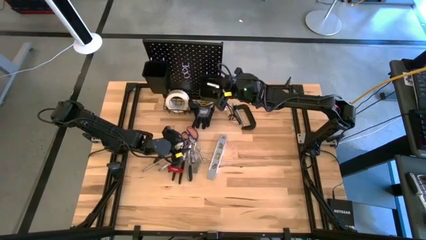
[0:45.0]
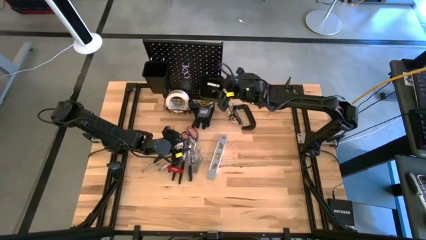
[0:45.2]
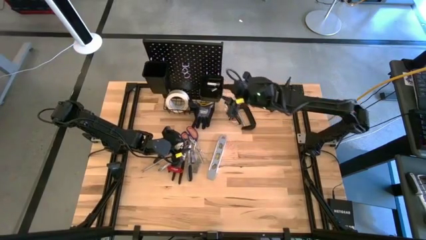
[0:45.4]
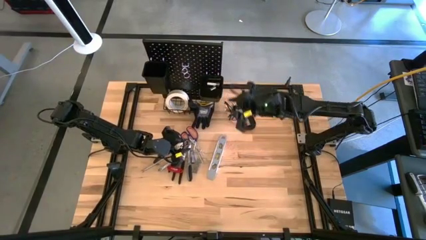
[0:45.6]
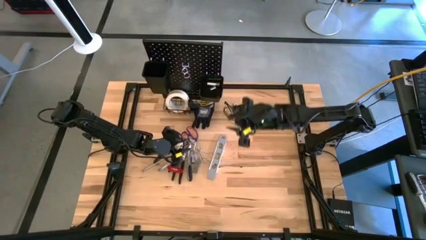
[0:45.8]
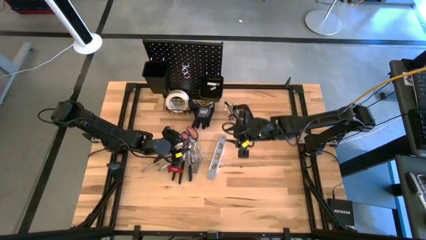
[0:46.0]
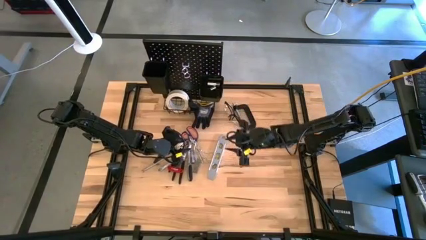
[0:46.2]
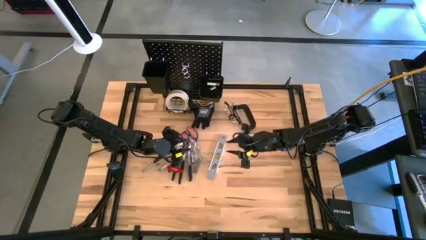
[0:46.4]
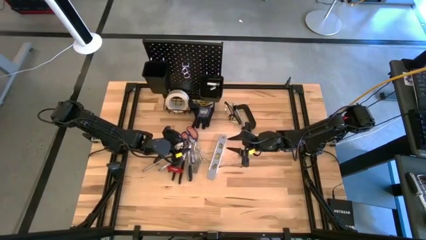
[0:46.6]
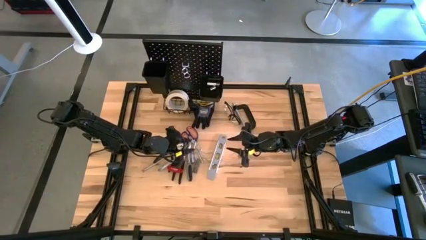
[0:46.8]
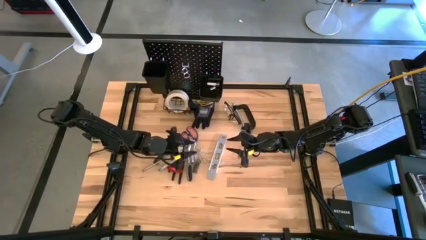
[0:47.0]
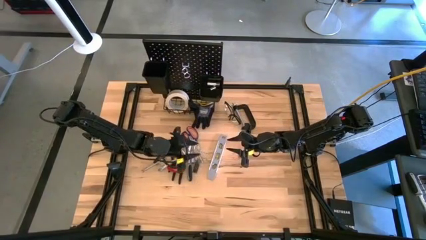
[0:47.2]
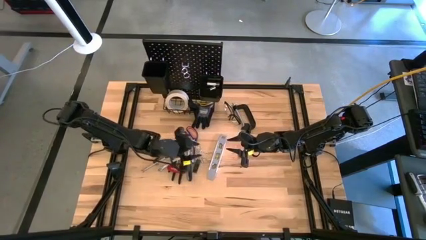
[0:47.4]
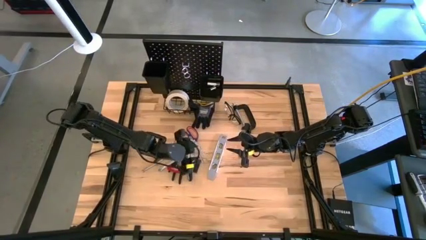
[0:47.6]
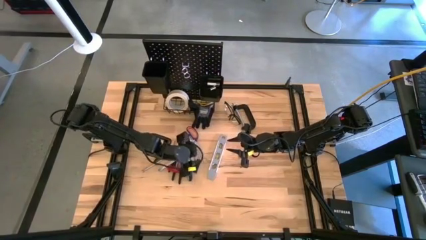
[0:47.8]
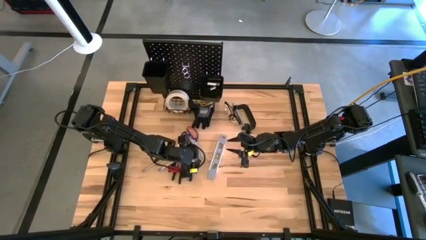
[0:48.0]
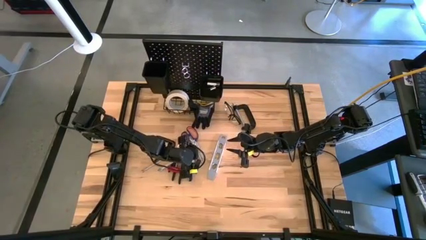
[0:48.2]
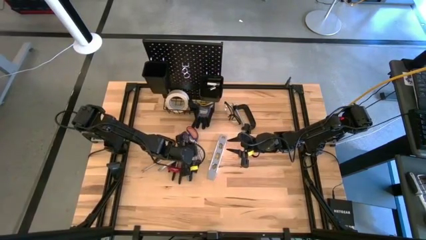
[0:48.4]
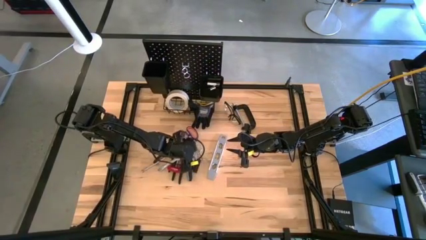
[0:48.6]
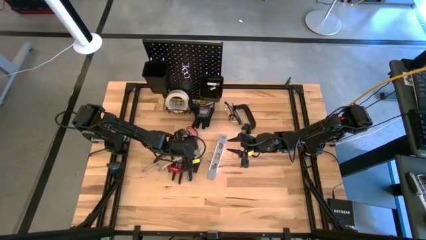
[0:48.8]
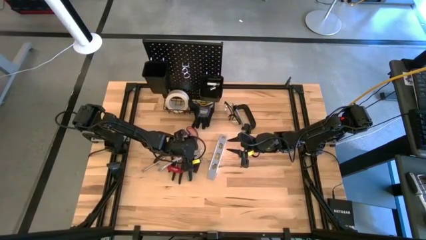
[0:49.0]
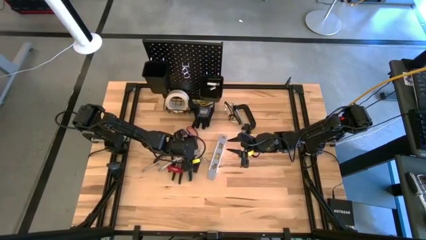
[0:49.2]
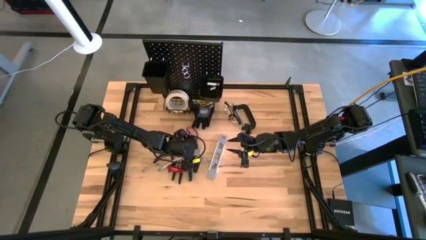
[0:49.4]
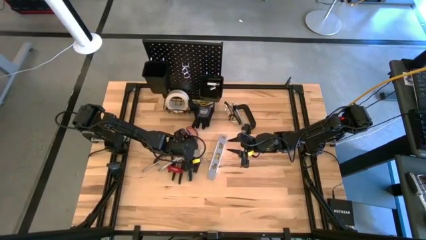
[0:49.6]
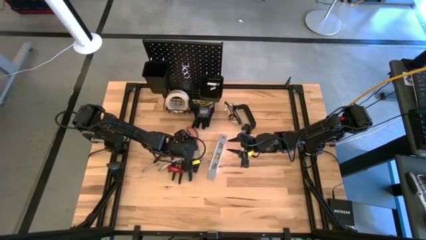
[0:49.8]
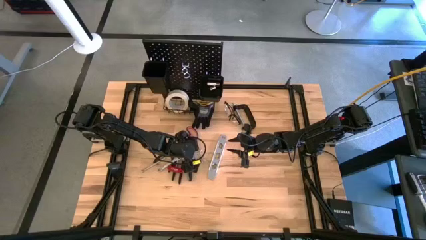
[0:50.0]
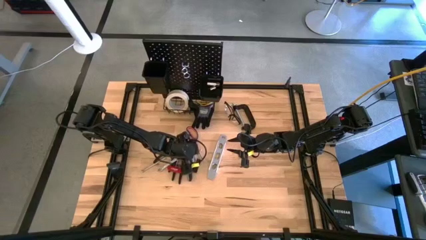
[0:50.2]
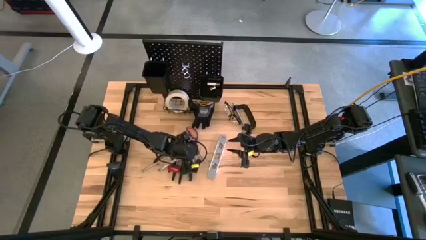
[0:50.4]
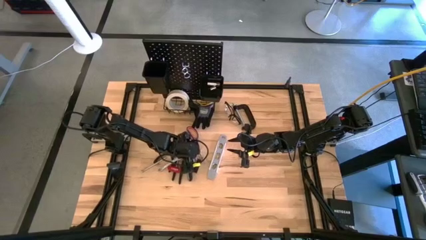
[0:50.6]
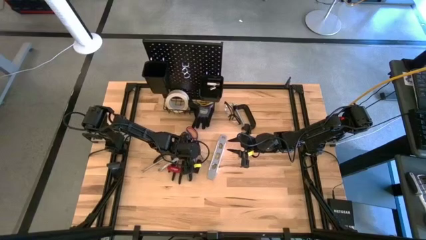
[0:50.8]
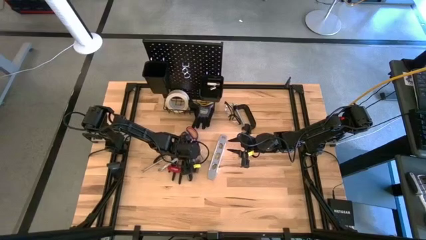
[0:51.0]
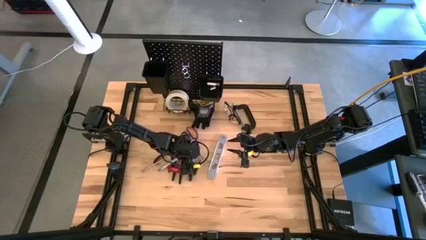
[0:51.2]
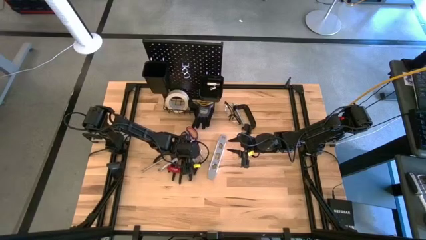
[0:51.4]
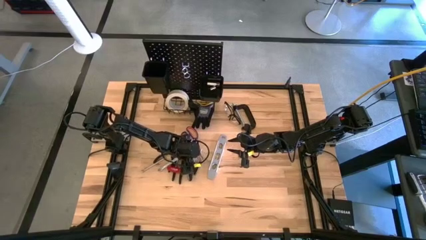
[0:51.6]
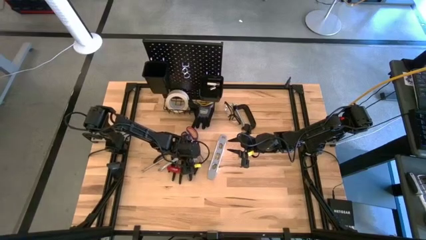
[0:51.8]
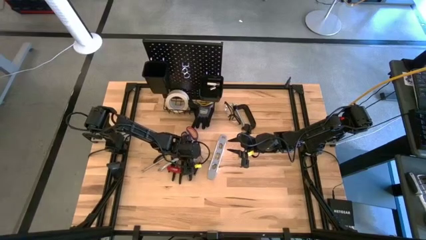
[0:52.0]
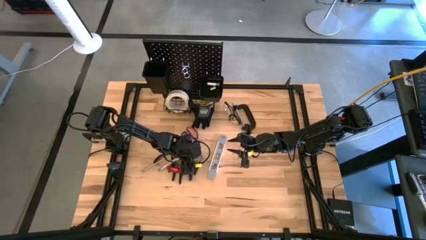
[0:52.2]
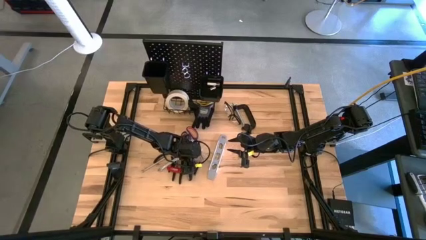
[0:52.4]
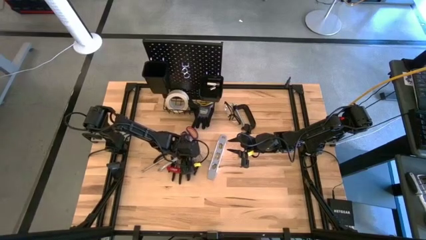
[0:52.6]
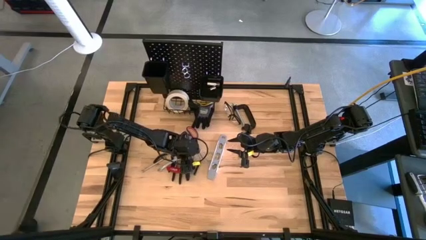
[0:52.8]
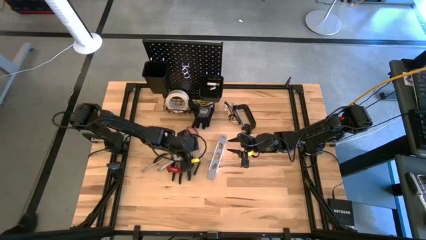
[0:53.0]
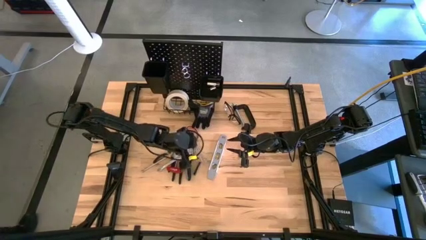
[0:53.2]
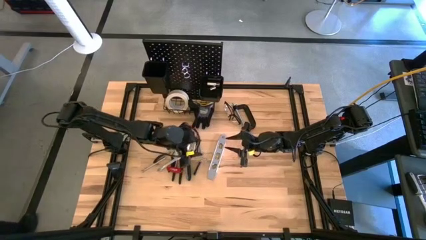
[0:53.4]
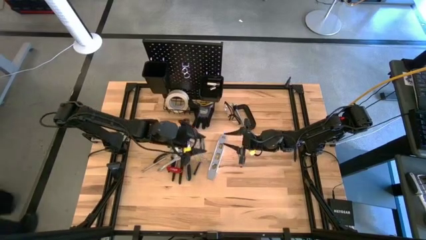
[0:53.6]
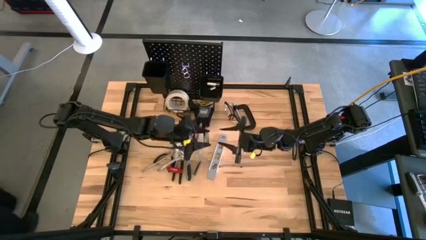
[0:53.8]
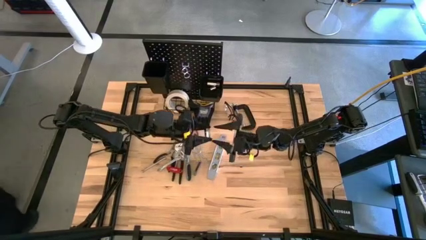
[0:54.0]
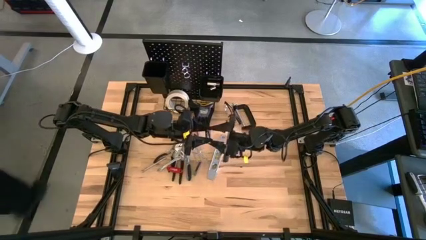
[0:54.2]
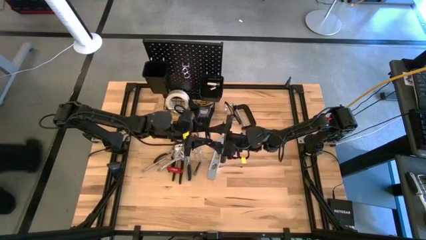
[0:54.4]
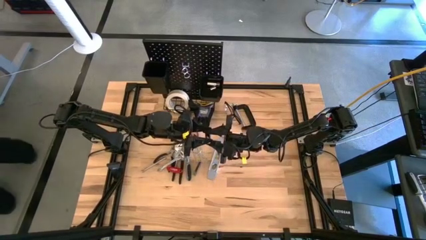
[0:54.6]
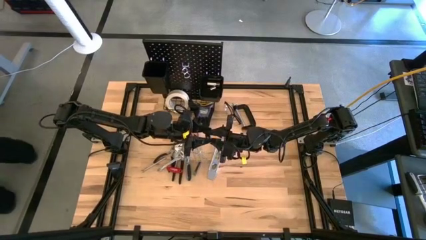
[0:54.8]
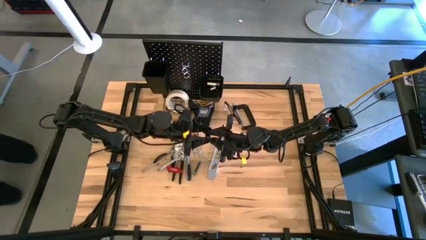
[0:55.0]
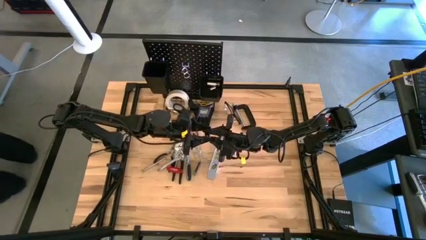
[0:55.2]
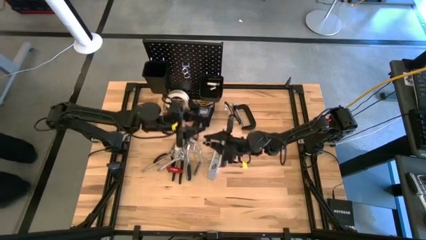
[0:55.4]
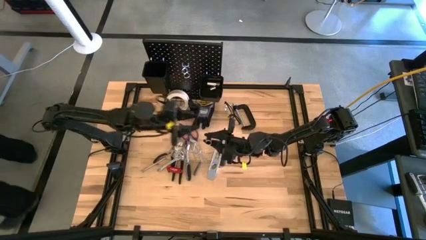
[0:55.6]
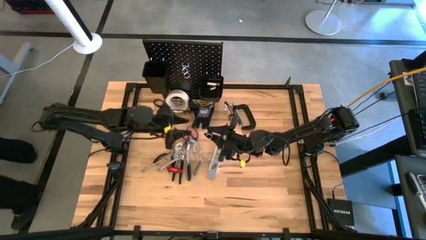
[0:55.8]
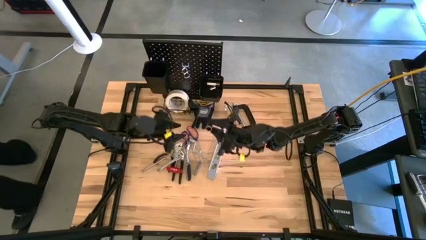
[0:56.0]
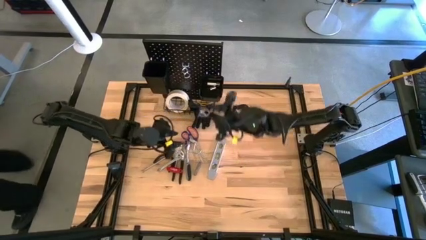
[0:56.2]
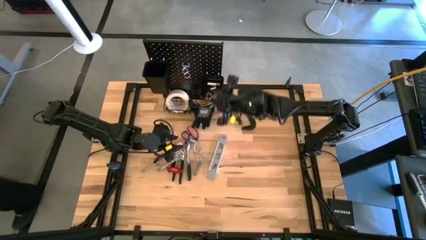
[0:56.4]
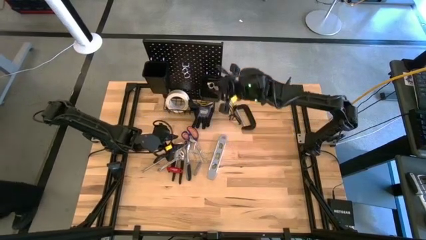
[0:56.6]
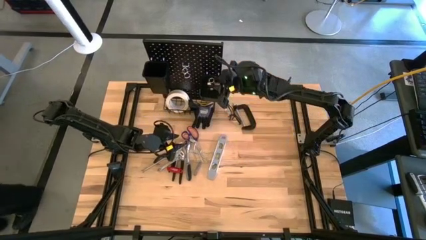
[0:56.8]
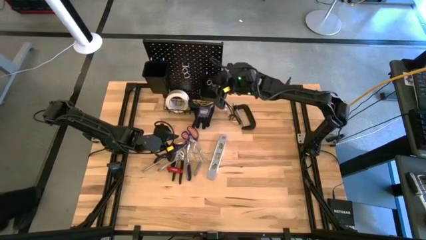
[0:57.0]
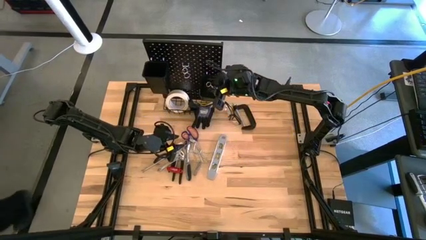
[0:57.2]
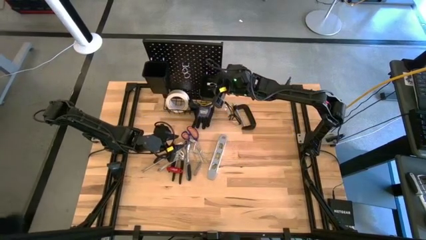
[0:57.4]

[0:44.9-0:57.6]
Task: Hang tools onto peg board
Put the extension bar into the right black bin on the pegboard

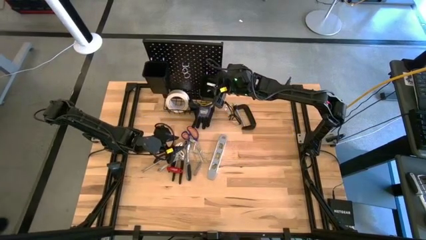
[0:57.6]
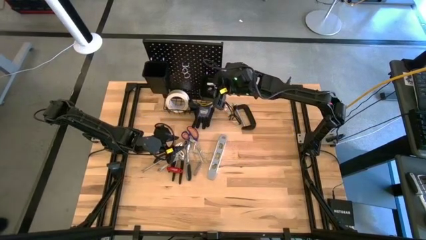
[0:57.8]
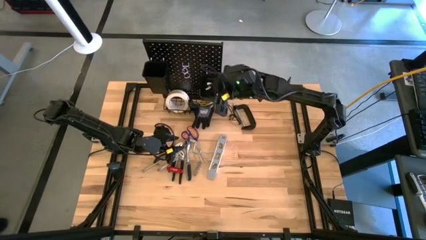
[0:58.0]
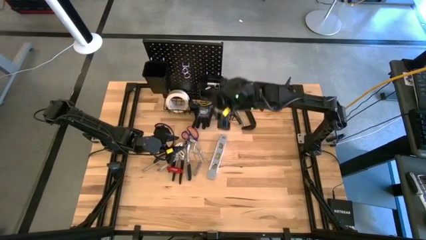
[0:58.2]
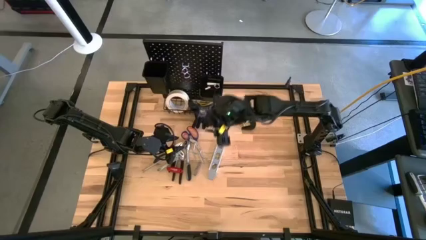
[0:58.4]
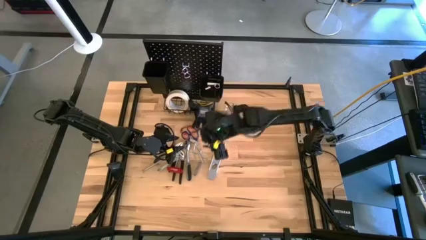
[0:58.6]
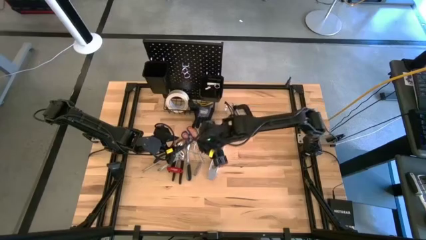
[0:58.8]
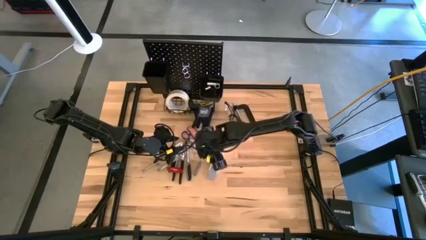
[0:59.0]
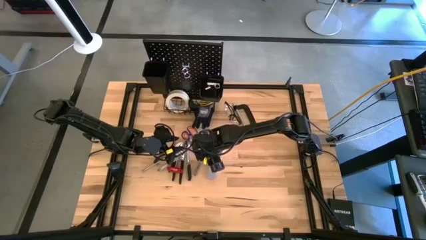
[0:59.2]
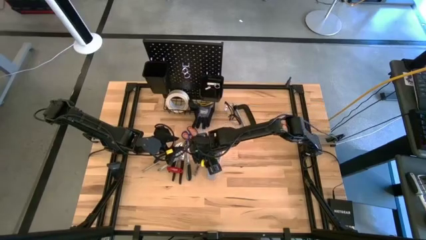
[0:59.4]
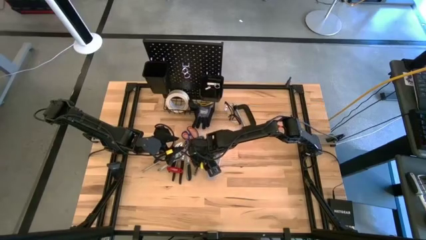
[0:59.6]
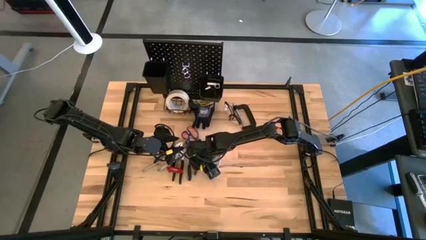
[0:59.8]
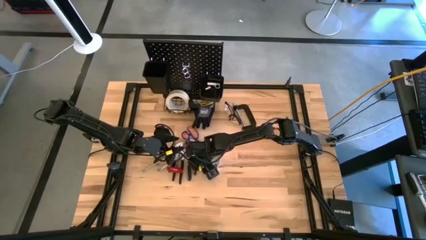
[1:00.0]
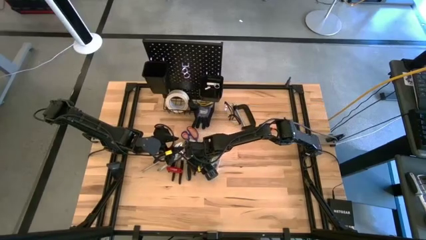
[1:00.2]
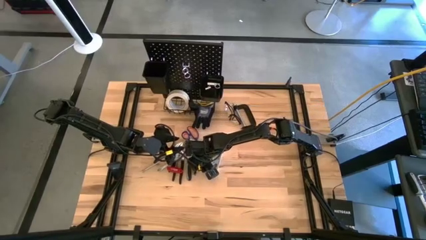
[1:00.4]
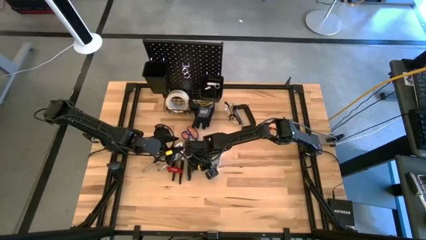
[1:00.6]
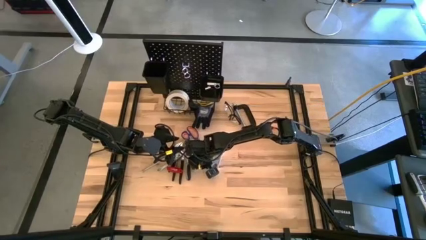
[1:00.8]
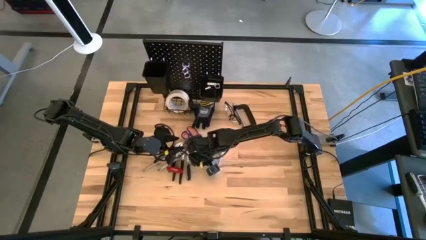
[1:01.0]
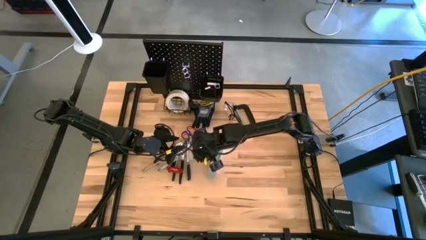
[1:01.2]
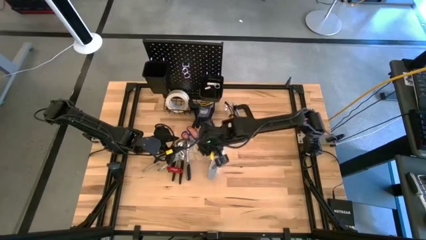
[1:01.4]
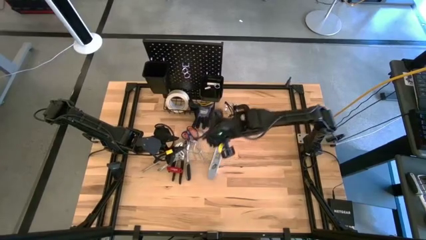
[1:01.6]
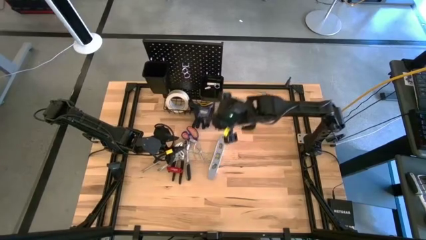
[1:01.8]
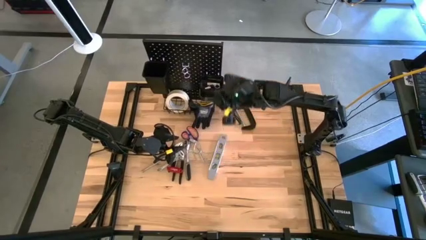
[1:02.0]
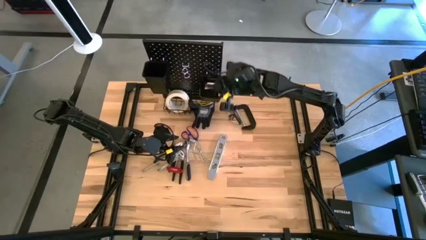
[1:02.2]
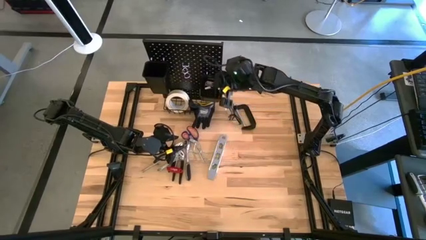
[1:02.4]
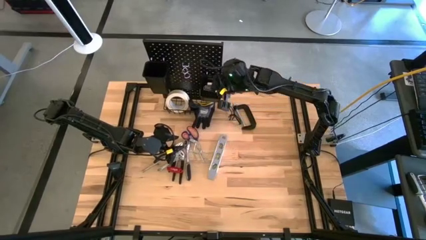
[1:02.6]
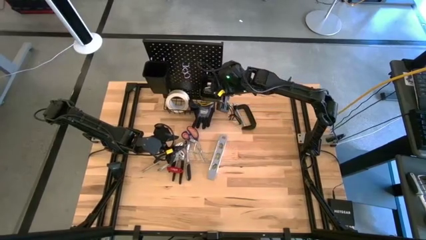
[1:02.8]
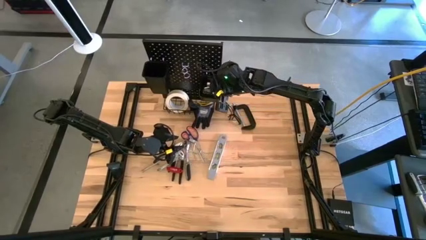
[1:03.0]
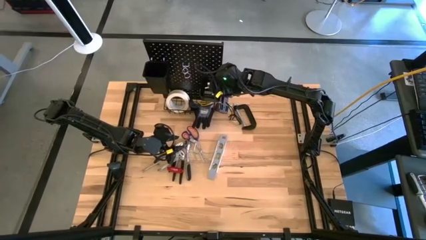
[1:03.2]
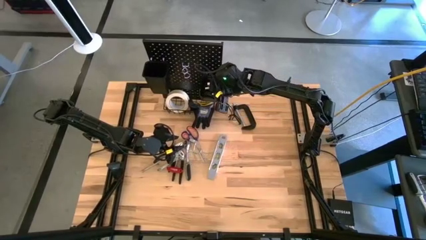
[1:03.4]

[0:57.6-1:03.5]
Put the leveler into the right black bin on the pegboard
